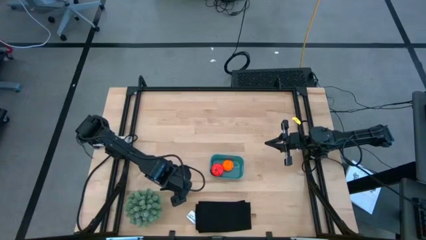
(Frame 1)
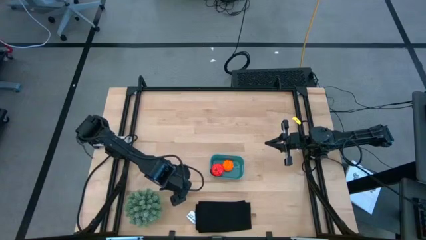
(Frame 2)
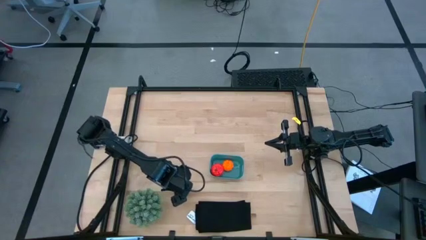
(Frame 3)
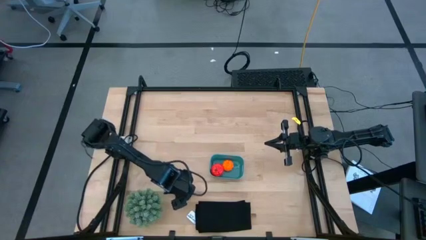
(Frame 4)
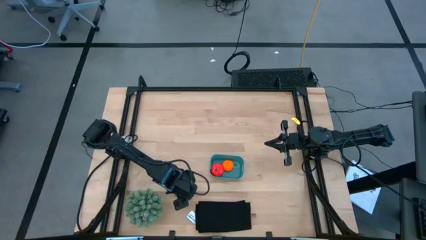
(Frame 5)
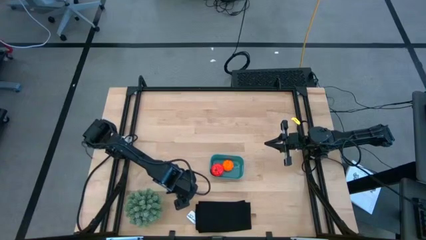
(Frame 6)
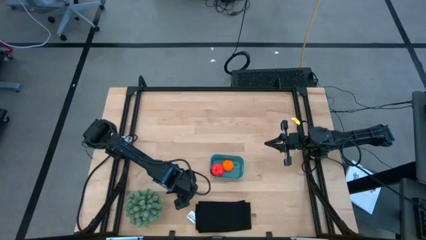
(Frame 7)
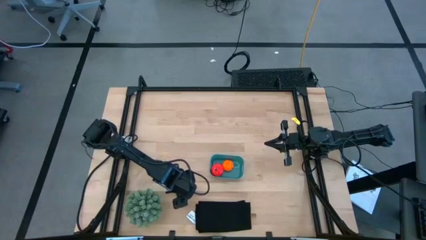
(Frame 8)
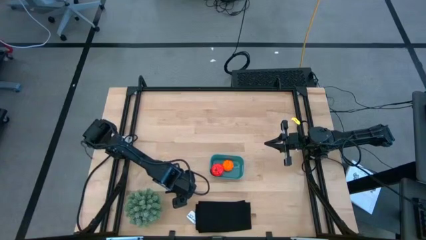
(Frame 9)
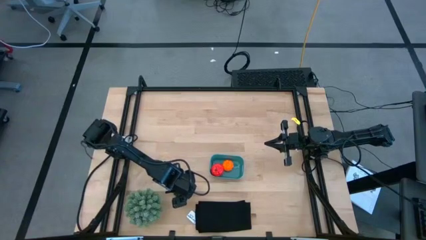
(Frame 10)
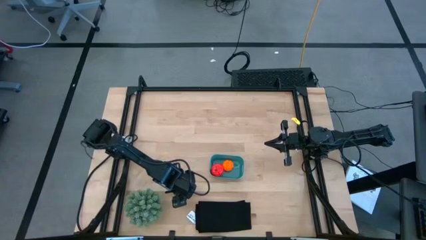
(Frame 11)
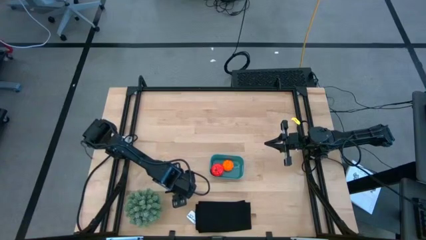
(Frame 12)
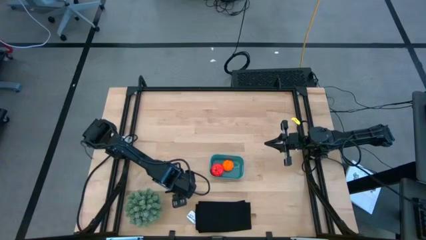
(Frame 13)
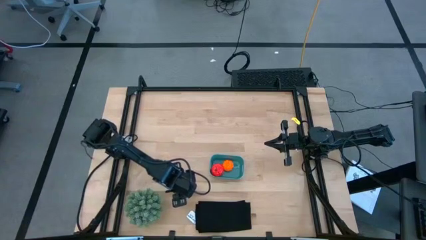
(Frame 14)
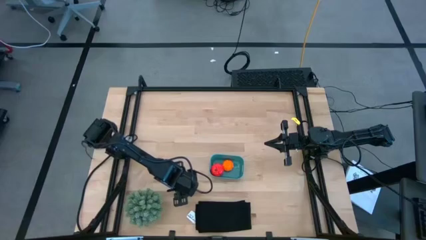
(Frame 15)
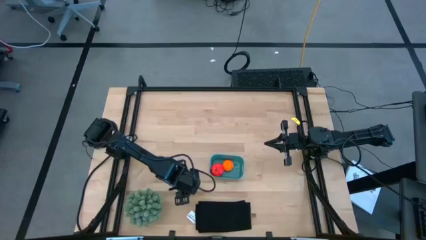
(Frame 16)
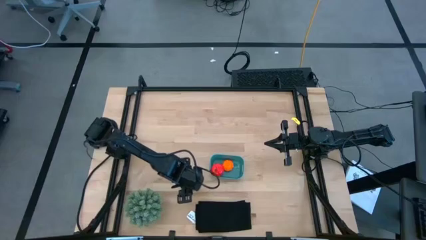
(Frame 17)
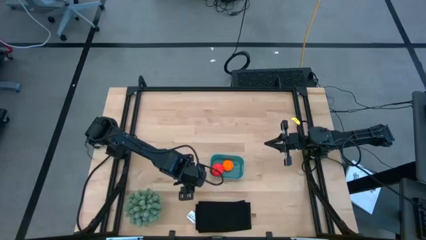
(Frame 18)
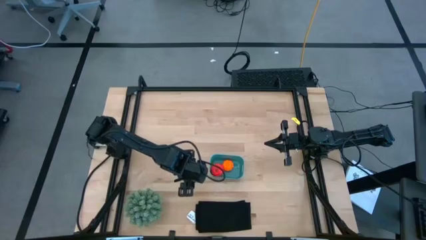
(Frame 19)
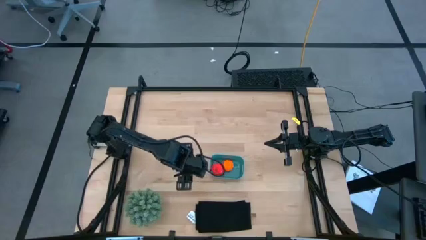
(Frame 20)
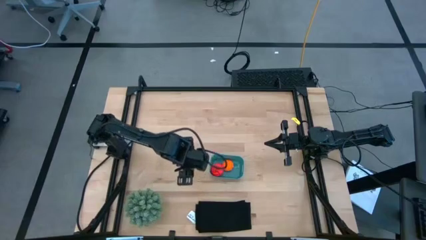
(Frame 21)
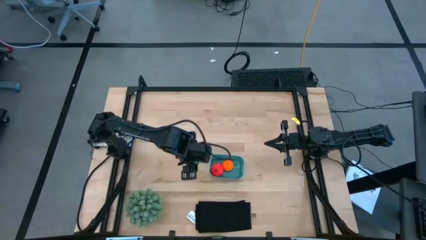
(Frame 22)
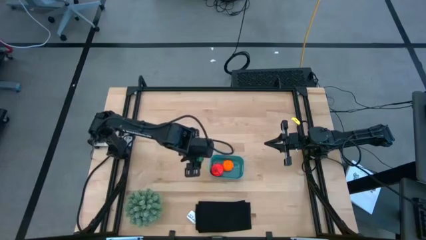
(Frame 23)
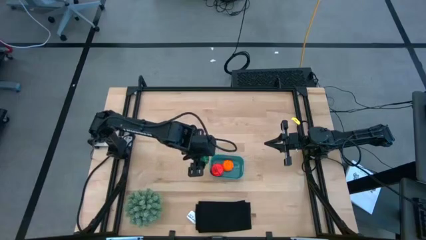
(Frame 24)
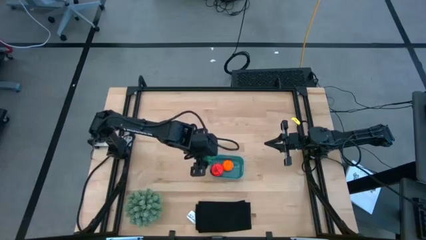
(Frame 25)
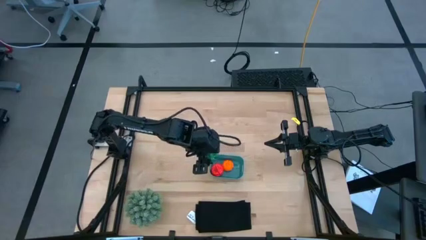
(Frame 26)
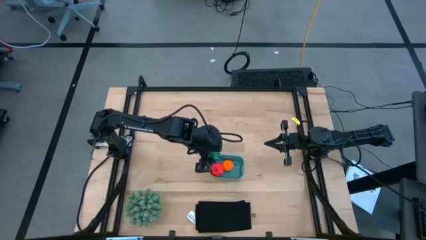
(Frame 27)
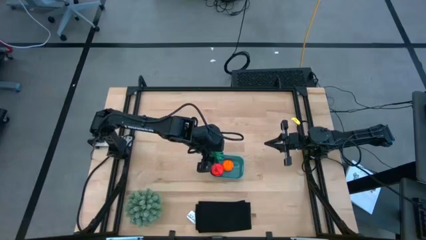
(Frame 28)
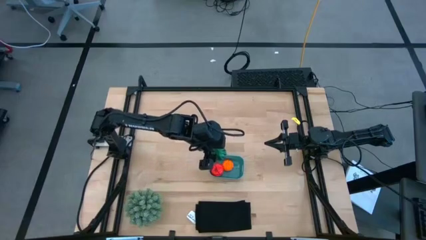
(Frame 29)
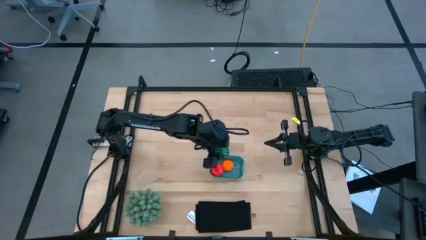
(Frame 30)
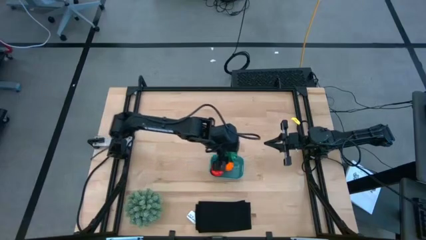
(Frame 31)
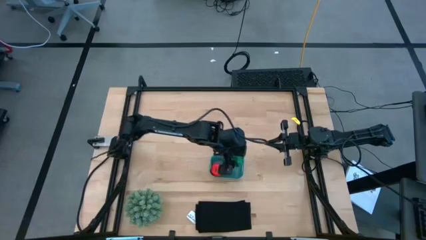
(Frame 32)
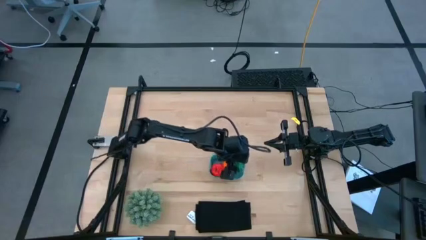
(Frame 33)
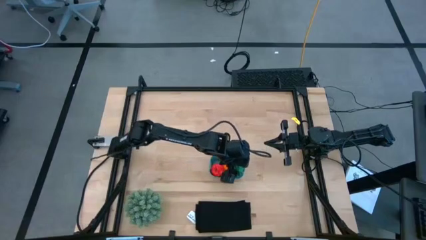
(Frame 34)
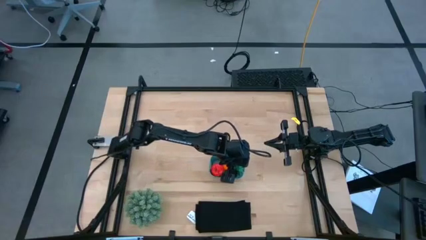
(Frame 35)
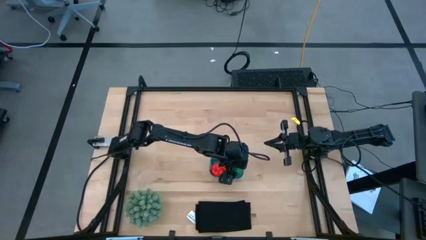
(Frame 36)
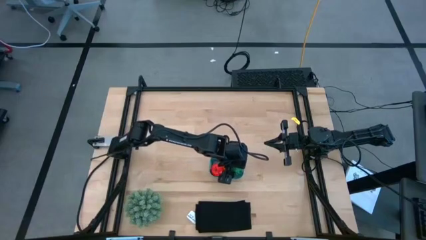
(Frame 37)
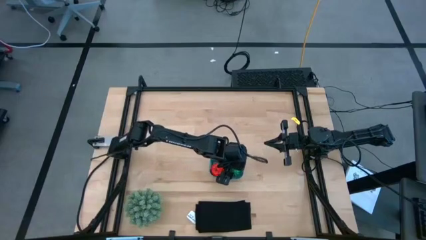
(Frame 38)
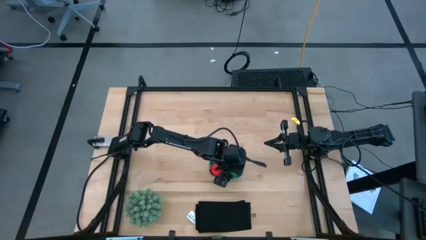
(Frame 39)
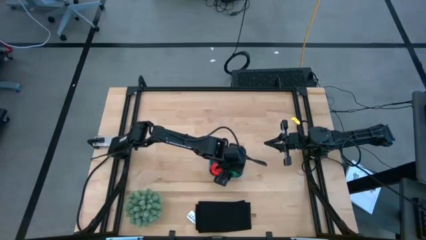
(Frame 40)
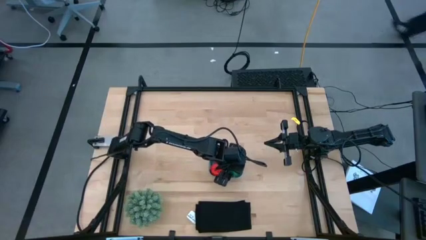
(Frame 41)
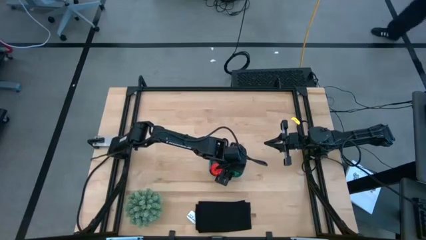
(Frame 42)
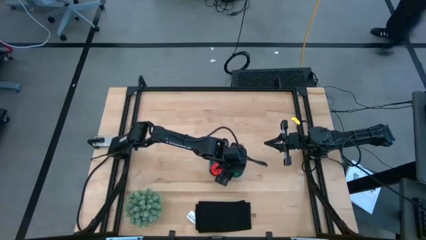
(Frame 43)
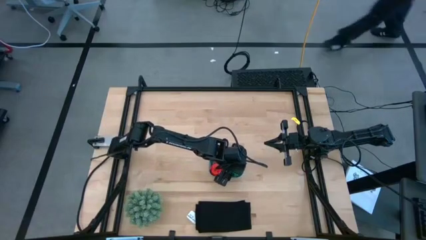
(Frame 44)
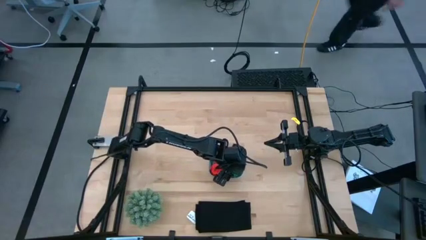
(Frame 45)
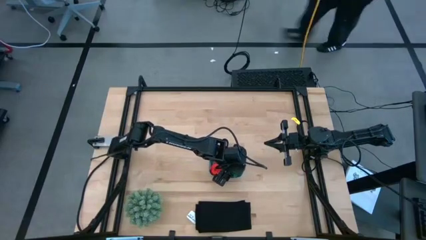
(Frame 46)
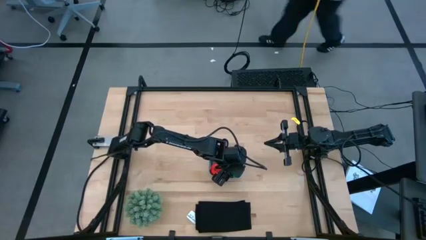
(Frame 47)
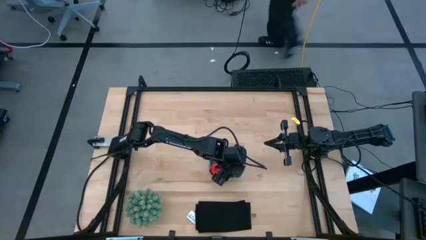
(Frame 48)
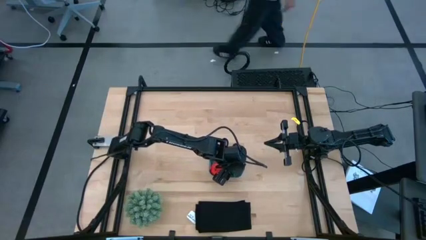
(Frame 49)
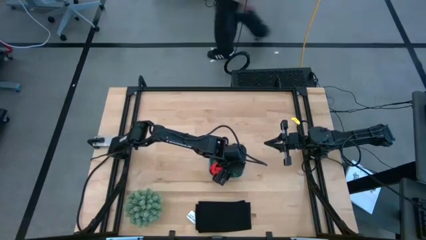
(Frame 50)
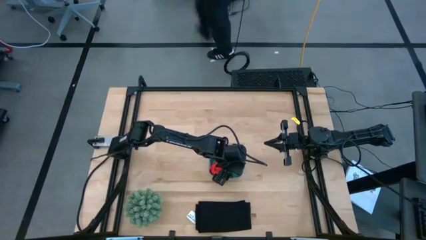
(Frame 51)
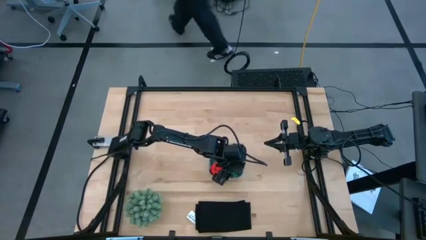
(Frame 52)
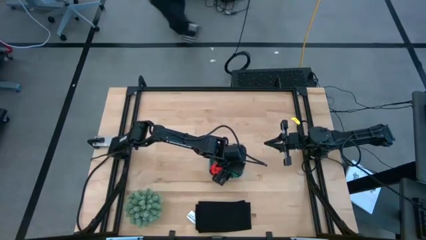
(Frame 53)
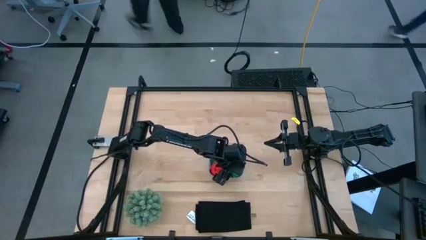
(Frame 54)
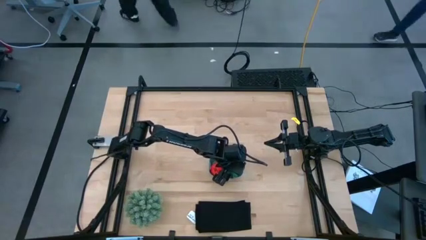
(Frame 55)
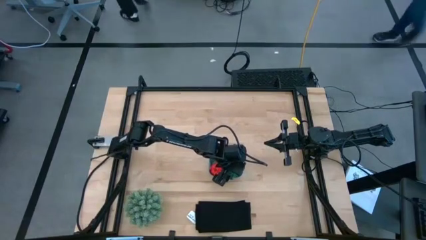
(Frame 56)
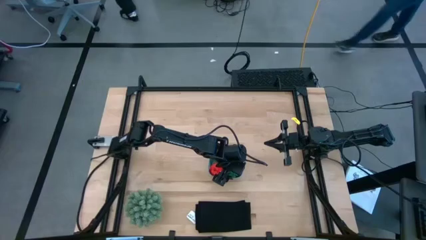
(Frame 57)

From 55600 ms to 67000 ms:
Task: Pick and placing Produce into tupperware
Put the watermelon into the basket
